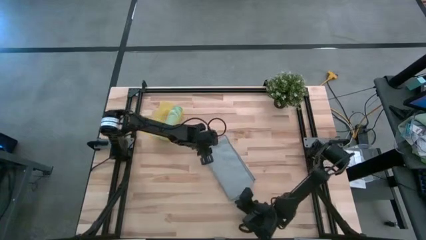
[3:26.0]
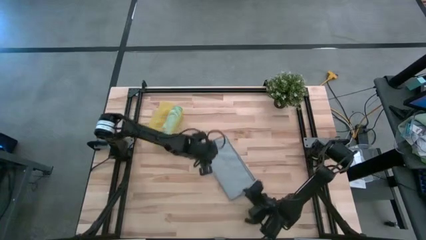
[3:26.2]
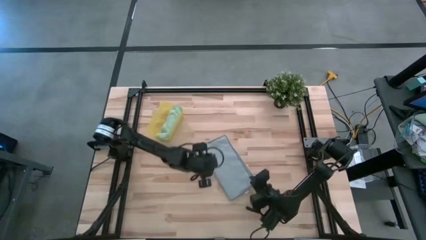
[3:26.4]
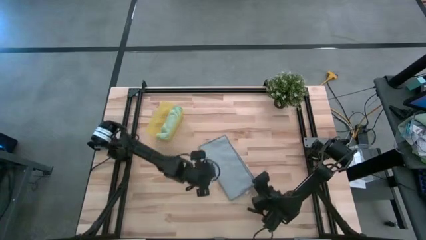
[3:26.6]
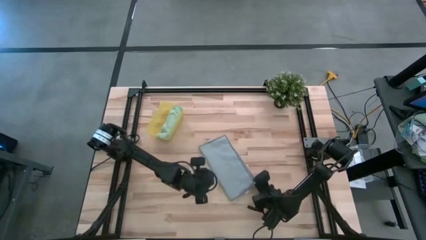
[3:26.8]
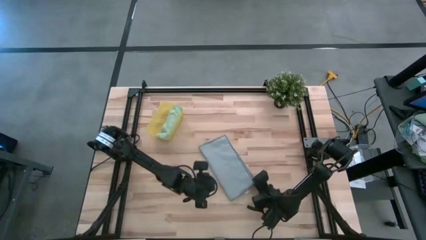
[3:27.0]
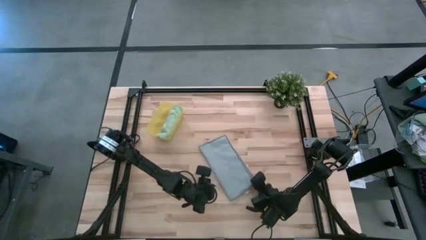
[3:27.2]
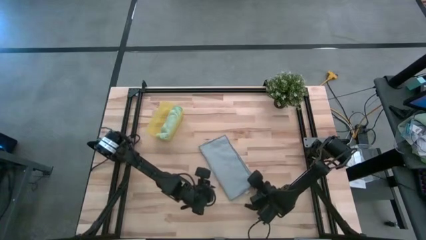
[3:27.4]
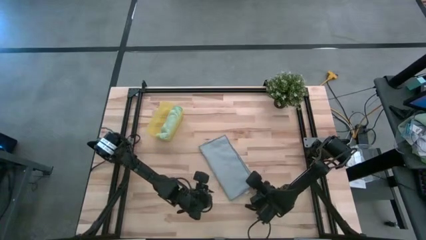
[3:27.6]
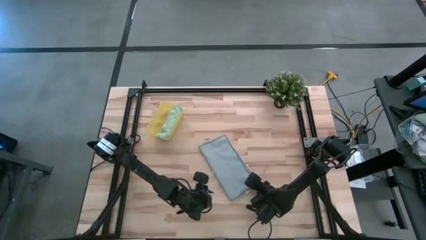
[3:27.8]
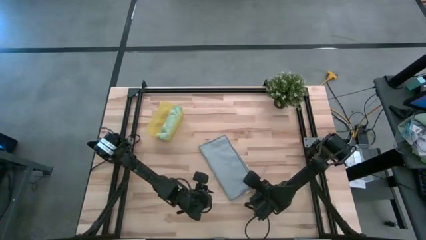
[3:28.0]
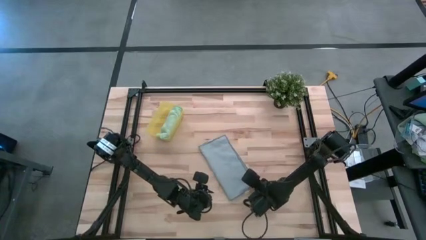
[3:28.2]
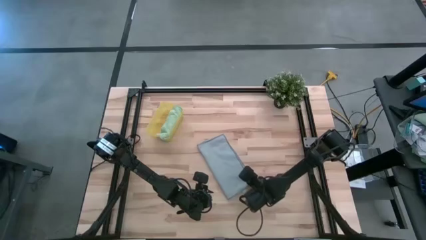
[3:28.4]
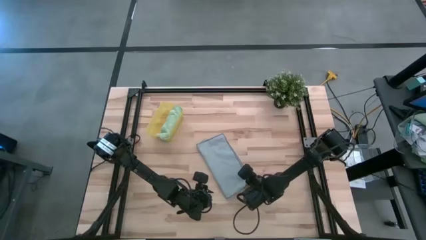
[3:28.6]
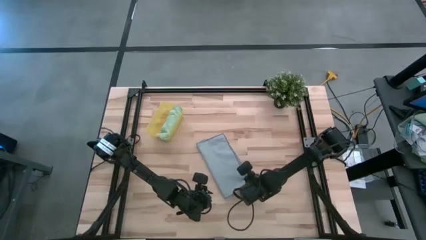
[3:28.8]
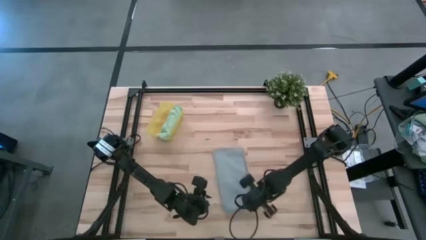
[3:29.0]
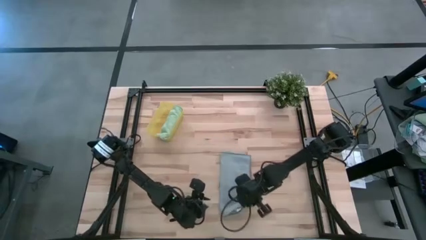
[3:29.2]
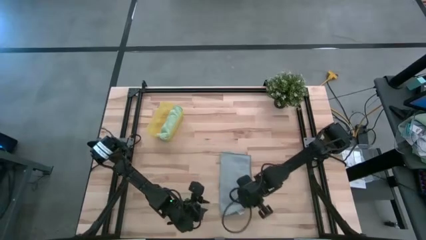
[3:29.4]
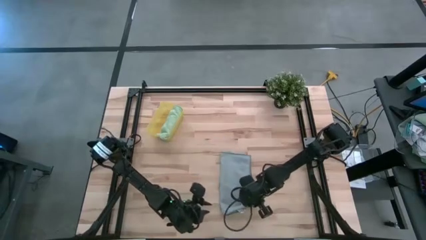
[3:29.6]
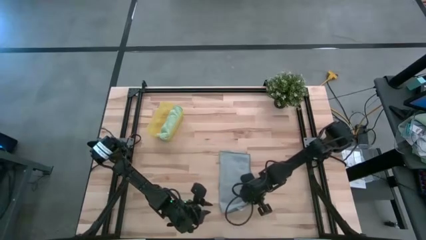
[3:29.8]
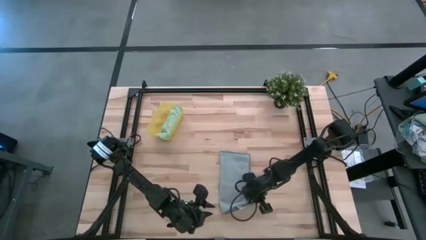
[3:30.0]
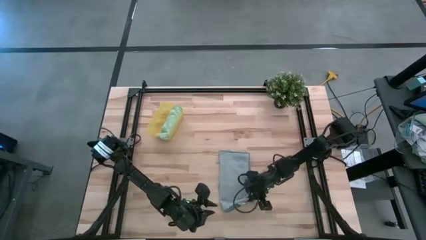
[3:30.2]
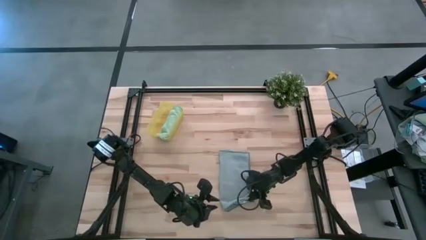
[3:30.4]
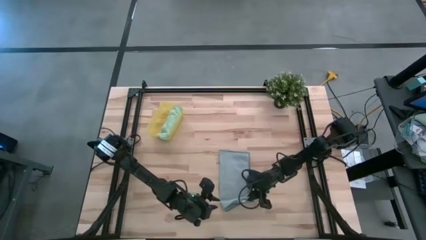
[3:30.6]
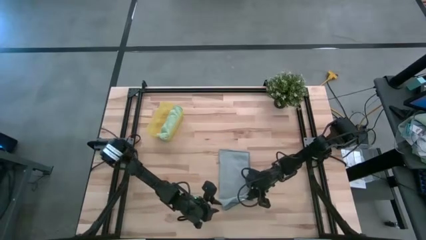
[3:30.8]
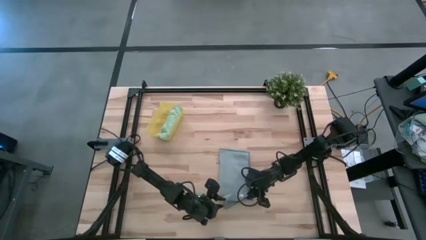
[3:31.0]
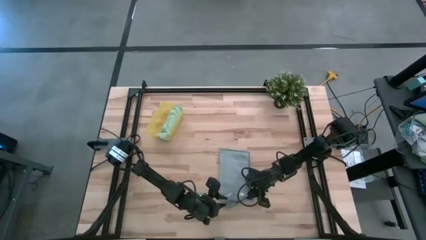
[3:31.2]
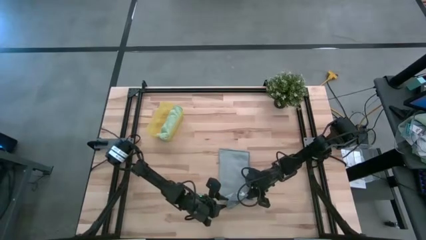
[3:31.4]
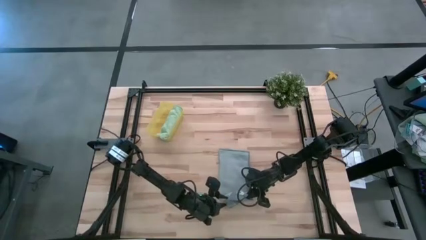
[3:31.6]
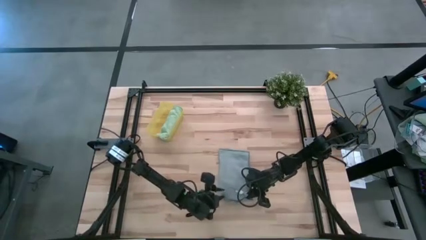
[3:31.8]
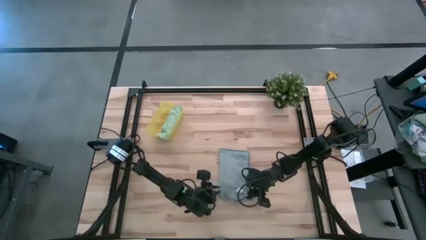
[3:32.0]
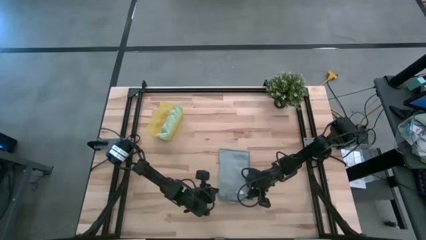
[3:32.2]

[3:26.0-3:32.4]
Task: Roll microfiber towels into tight, uniform cylinder then place into a basket
Roll the gray towel

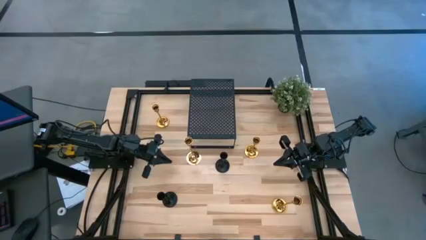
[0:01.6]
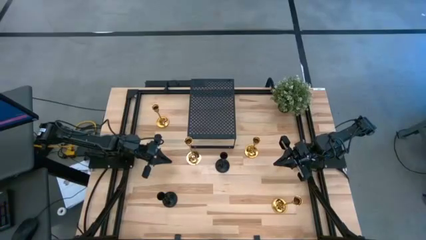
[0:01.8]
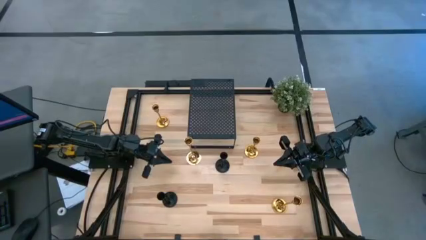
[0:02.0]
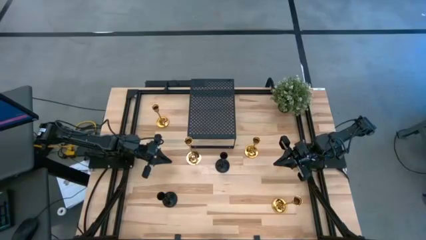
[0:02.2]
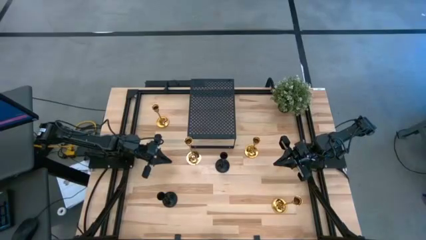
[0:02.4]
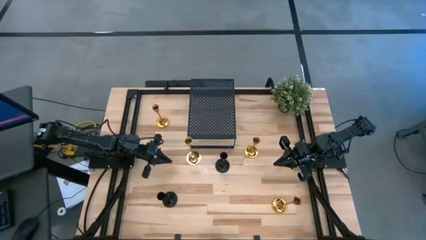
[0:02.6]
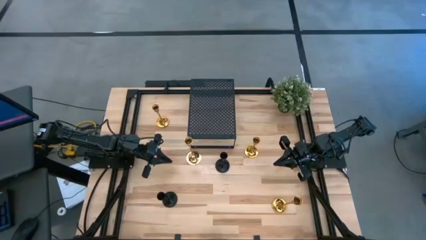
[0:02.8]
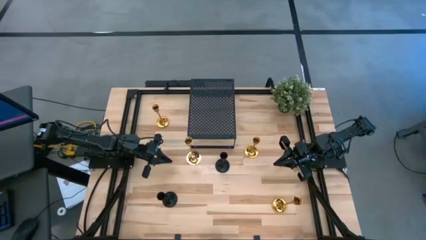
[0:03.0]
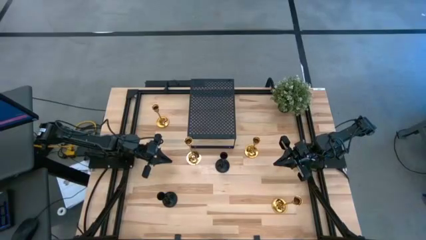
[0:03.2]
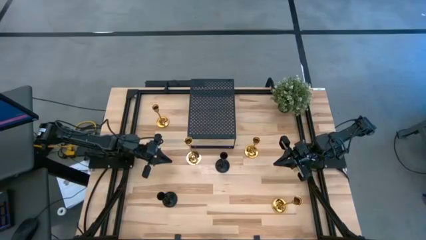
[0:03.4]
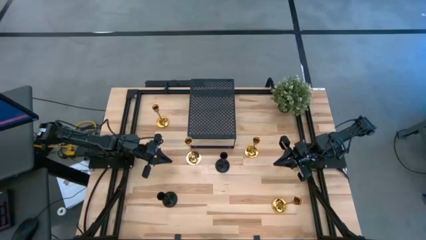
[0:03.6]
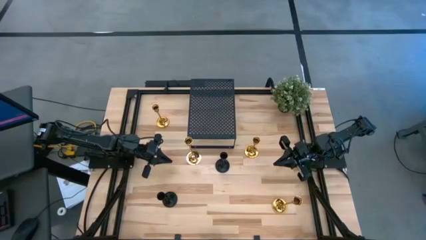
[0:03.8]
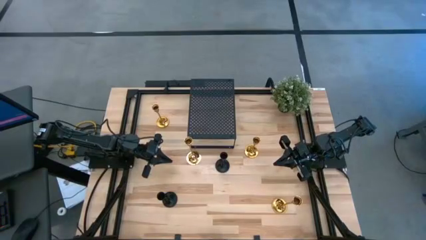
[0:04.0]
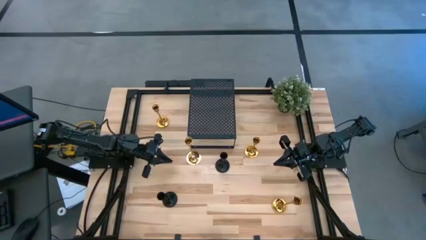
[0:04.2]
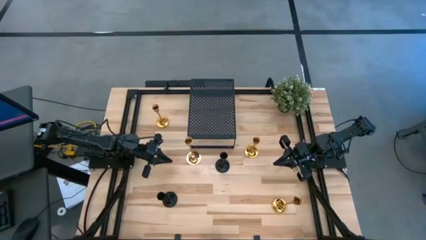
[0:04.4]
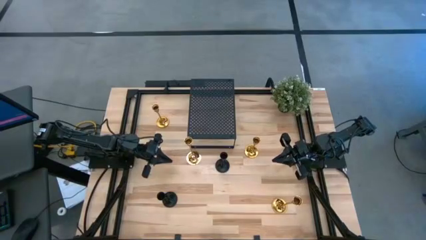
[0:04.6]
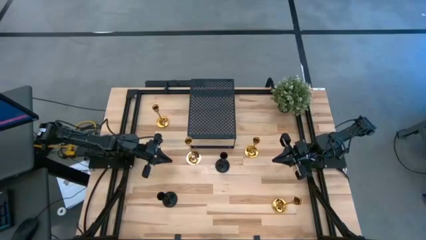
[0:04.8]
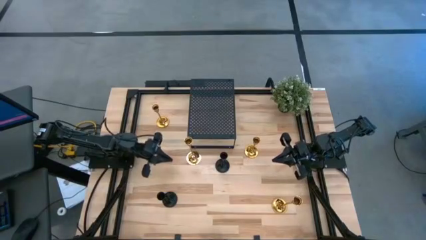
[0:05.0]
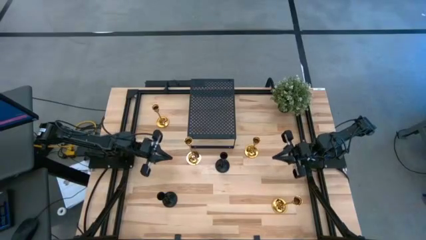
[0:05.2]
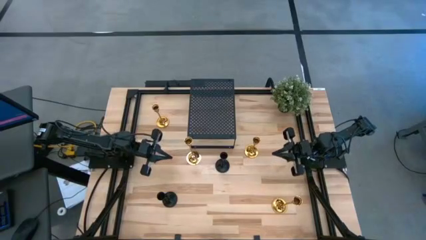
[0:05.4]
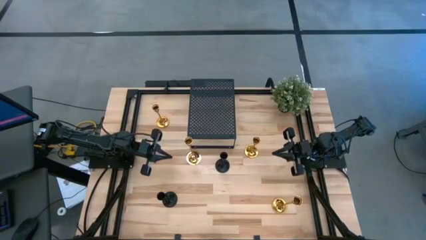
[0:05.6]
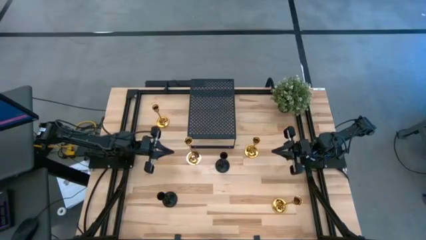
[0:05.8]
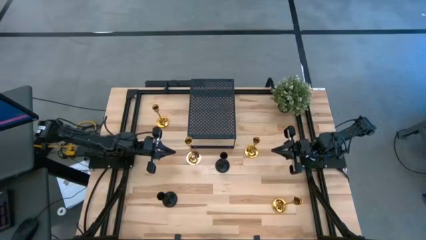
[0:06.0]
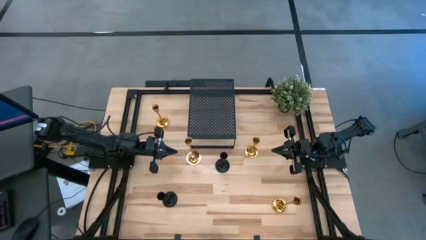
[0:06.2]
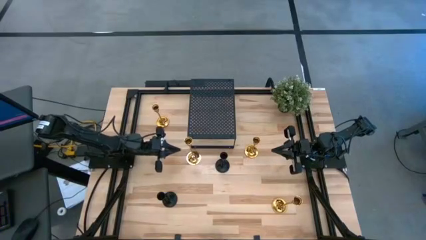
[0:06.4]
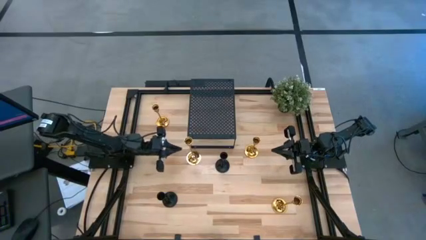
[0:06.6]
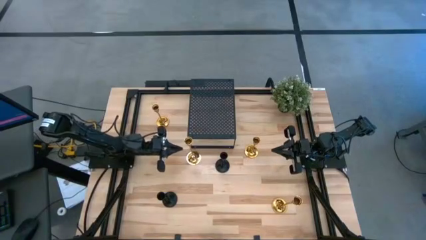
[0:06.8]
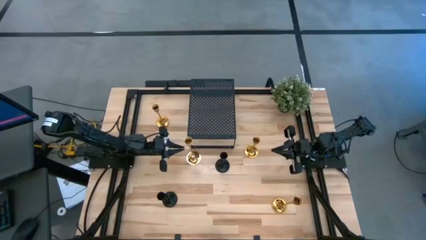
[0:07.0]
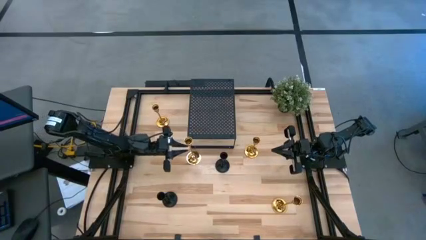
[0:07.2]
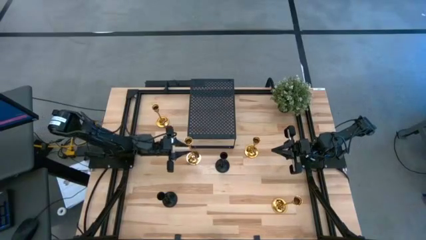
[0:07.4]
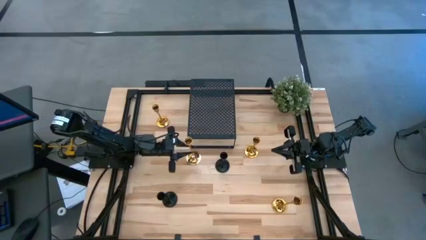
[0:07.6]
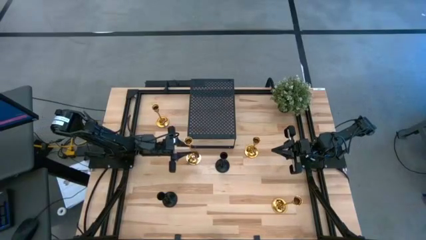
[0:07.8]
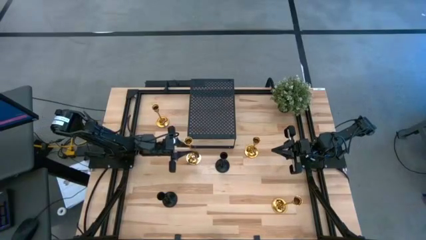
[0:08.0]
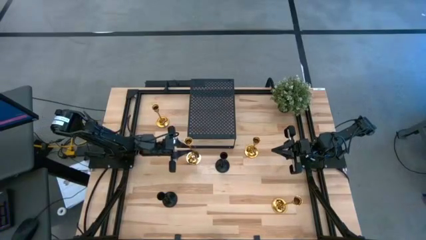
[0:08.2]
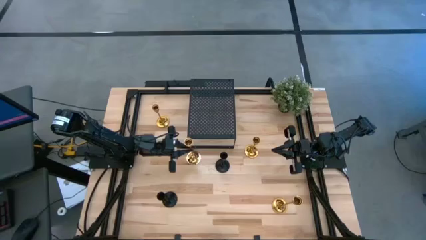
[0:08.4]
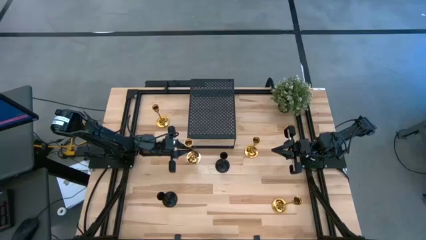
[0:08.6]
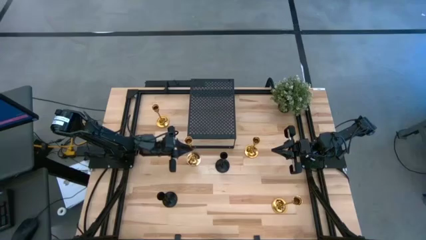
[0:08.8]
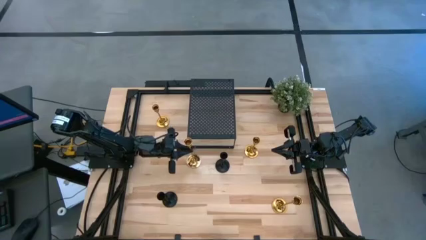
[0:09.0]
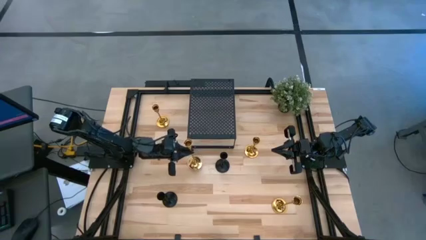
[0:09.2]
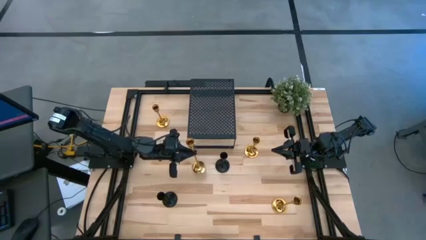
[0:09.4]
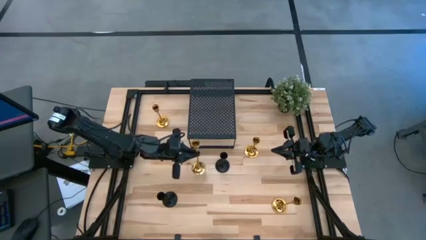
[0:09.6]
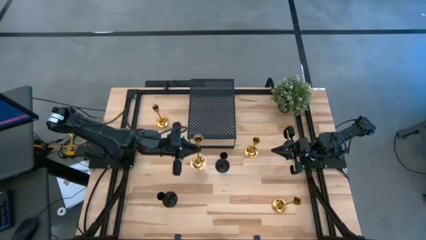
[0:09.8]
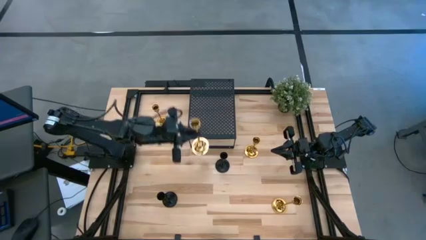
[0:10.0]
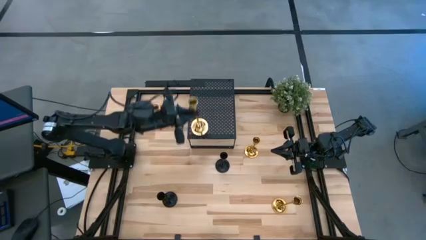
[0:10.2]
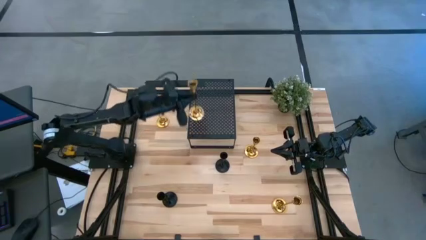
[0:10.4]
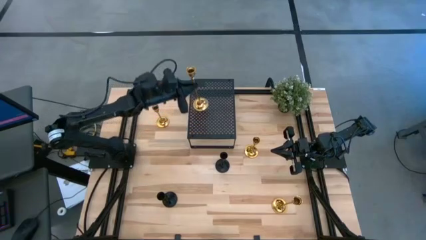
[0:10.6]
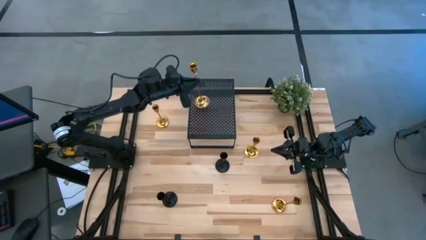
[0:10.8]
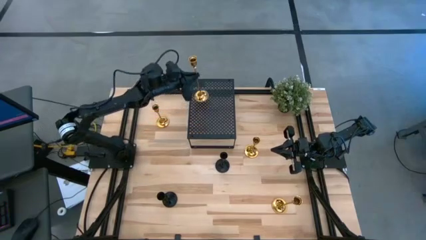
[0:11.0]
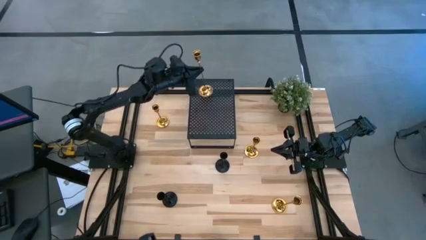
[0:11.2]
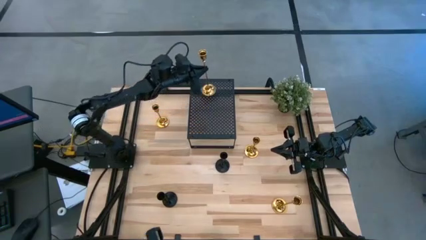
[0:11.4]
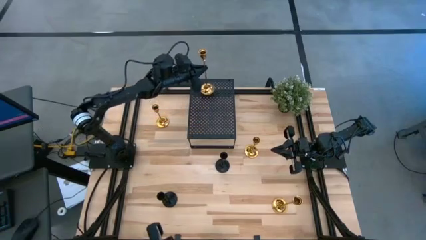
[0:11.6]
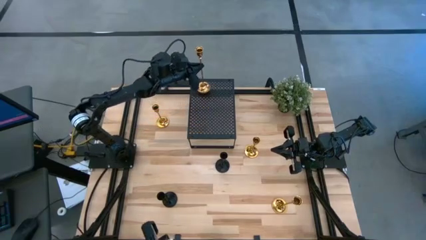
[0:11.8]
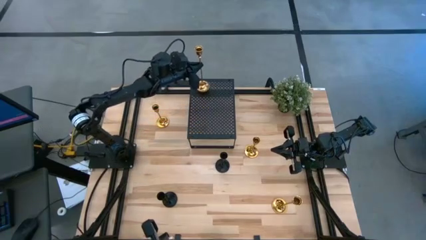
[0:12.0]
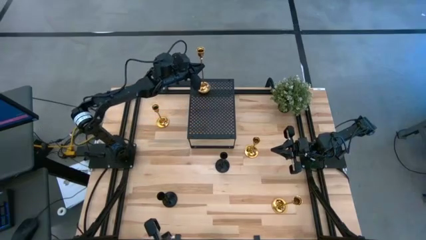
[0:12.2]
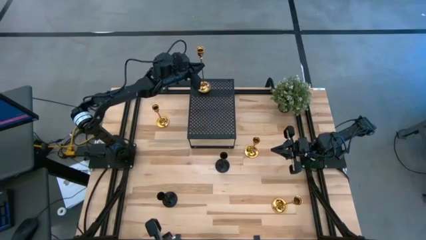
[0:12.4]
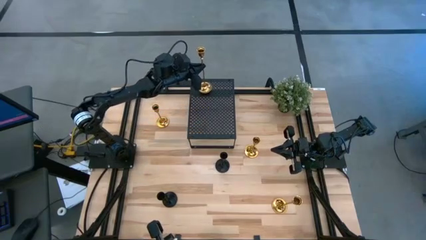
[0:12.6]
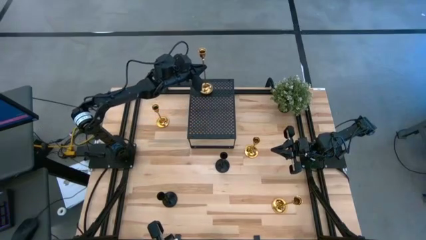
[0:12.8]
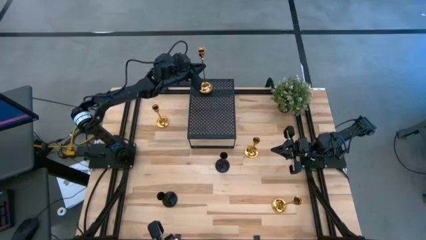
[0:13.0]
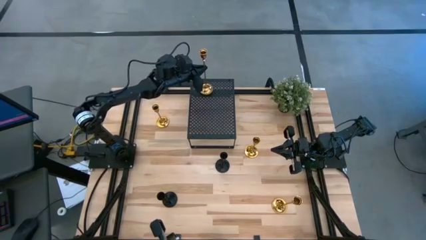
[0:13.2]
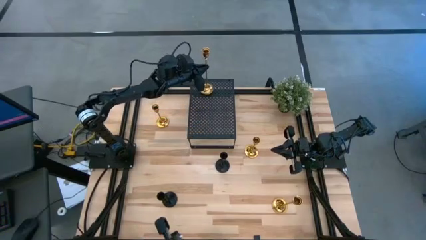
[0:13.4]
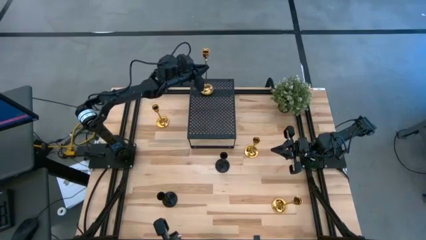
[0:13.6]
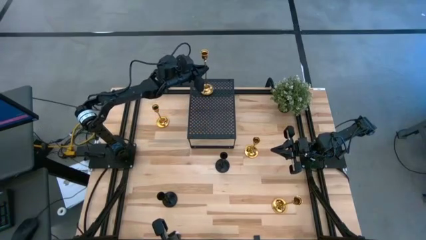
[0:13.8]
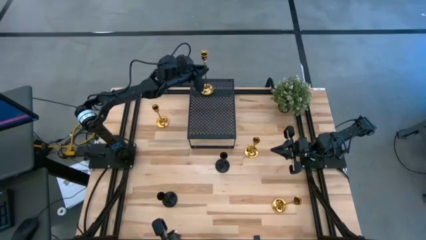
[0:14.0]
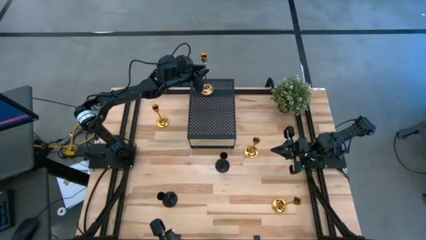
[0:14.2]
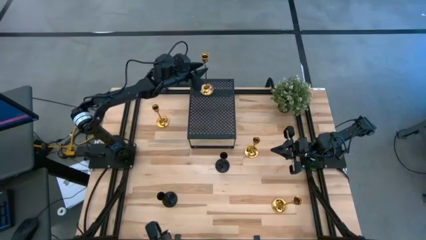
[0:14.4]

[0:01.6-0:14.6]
Task: Pick & Place candle stick holders
Put the top large gold candle holder on the shelf
